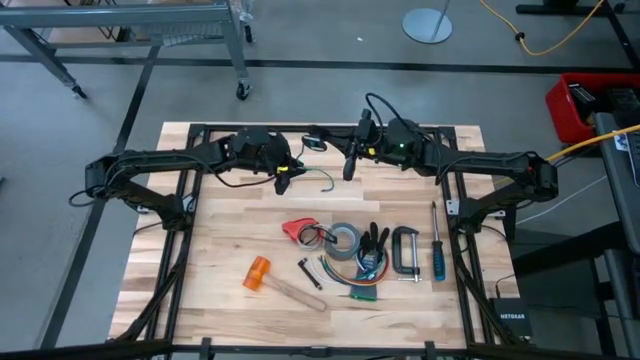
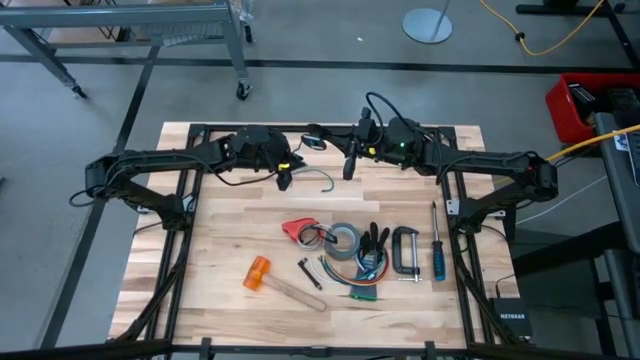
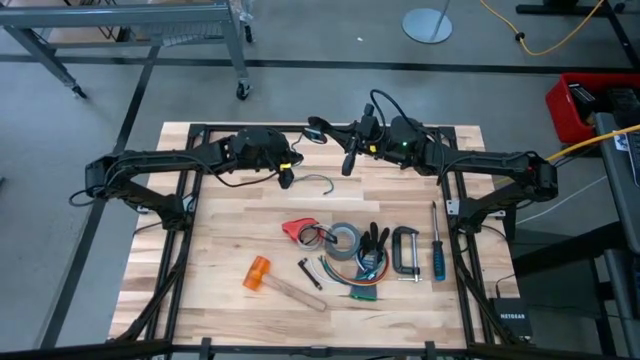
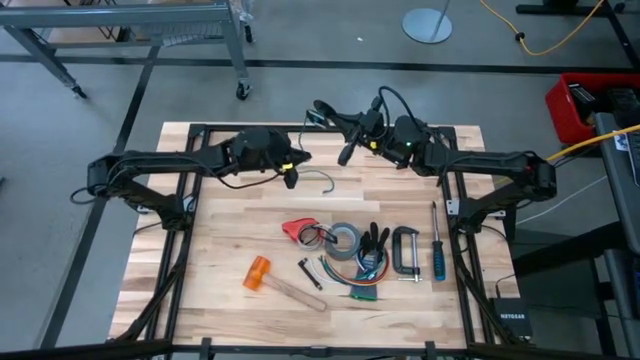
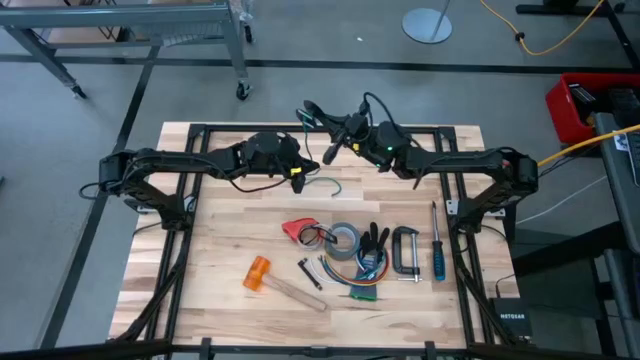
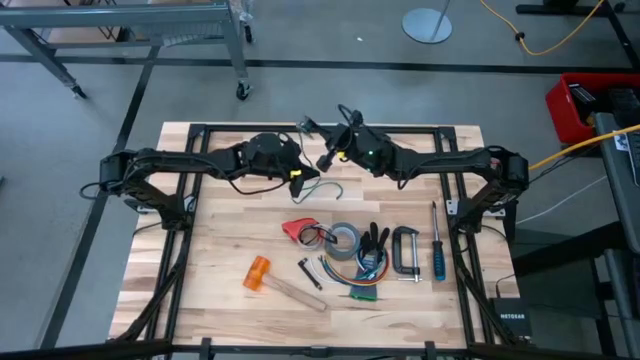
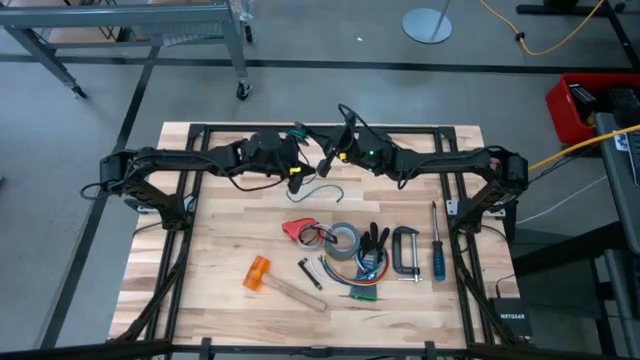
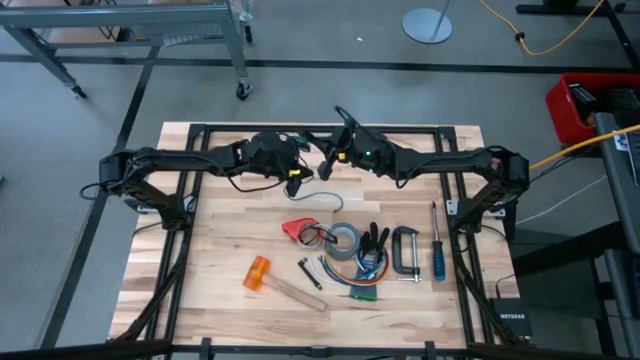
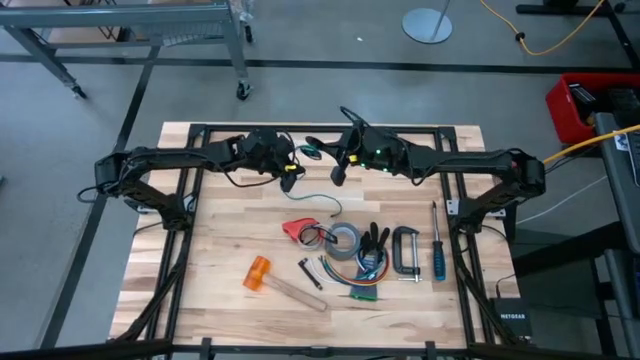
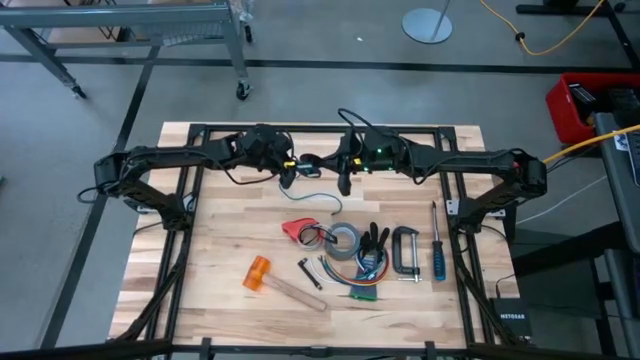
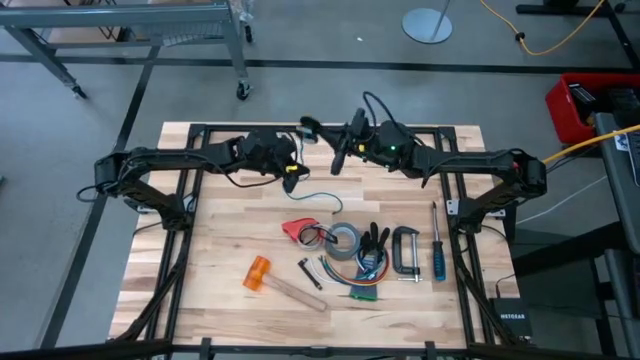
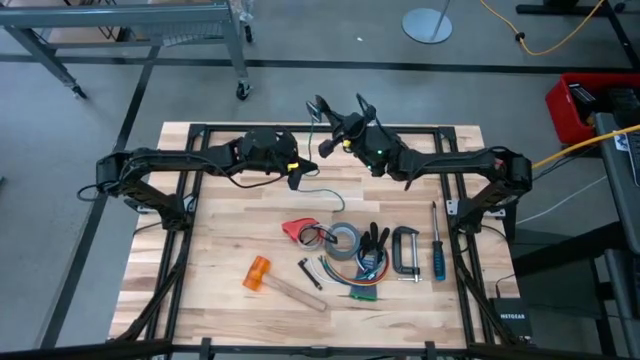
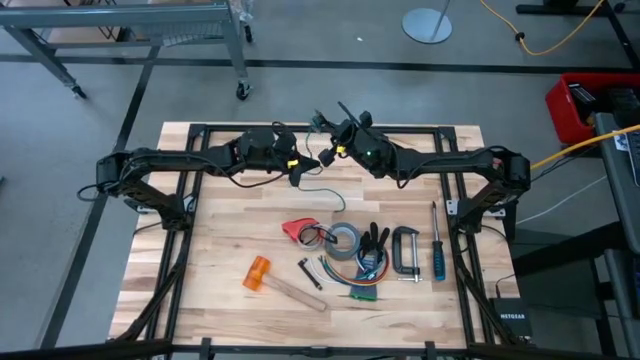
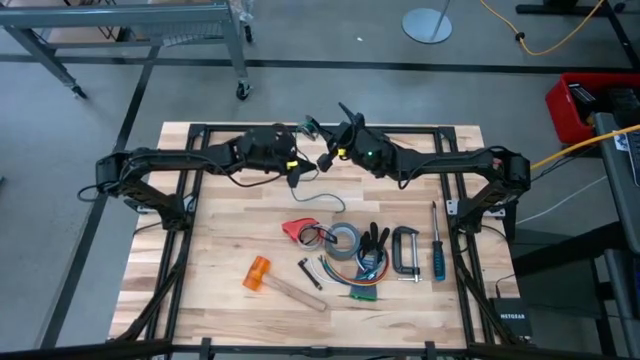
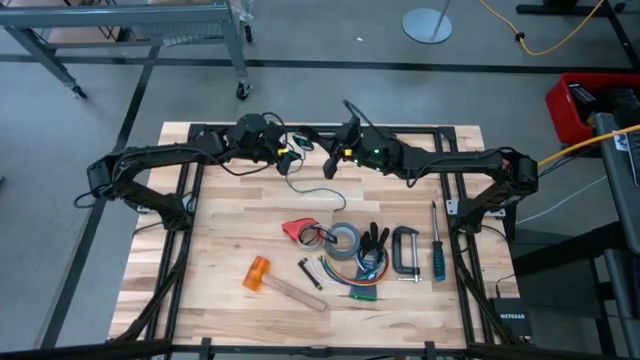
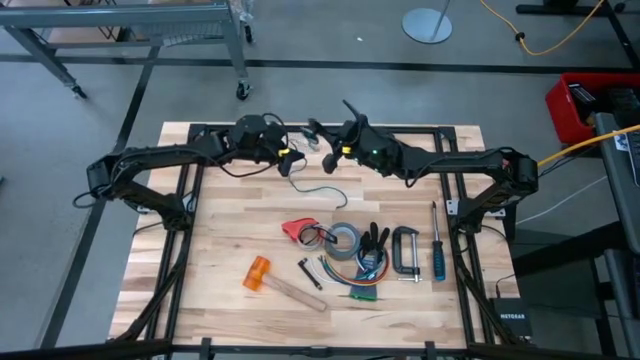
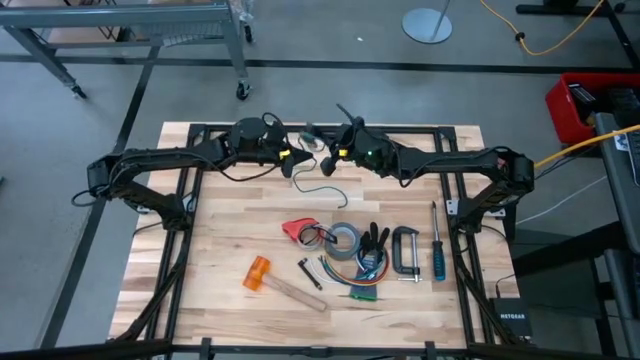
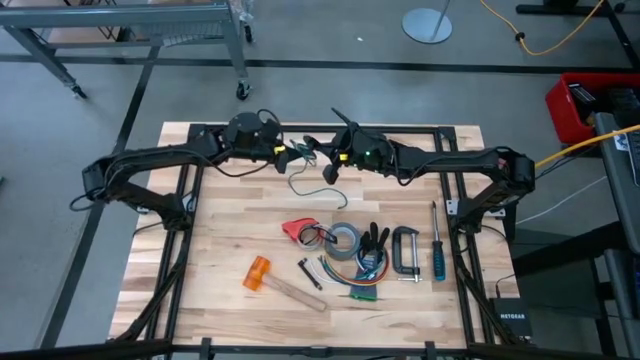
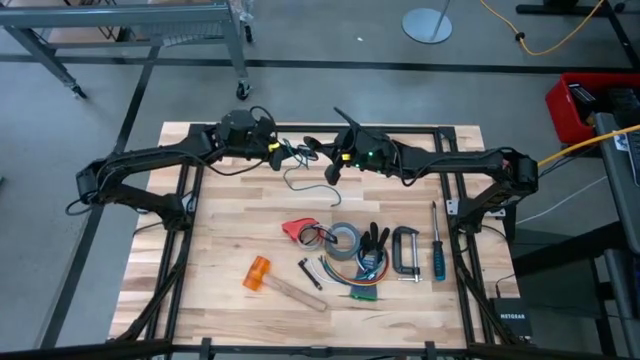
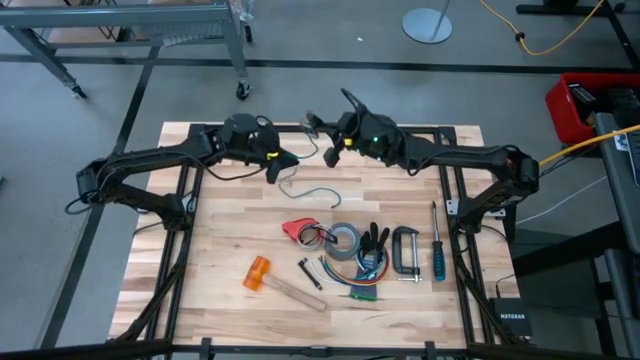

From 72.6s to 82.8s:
Task: Coil cords
Coil the green cable wire on the black spool

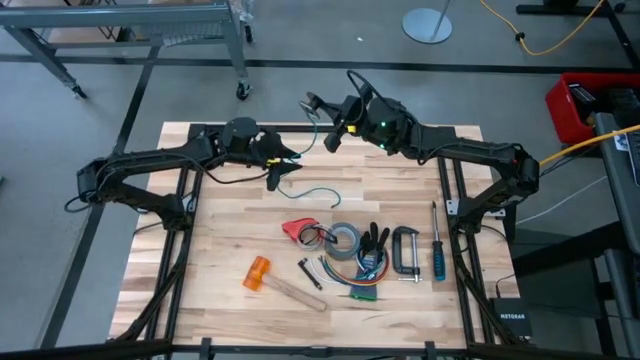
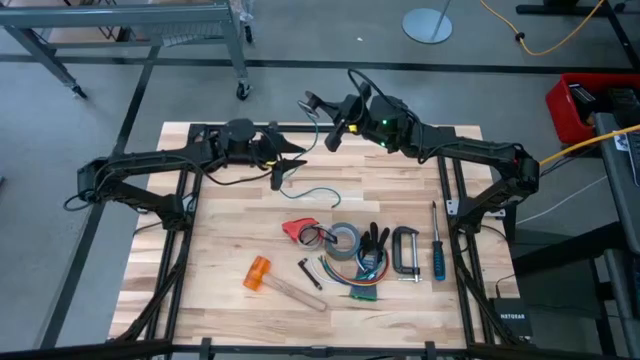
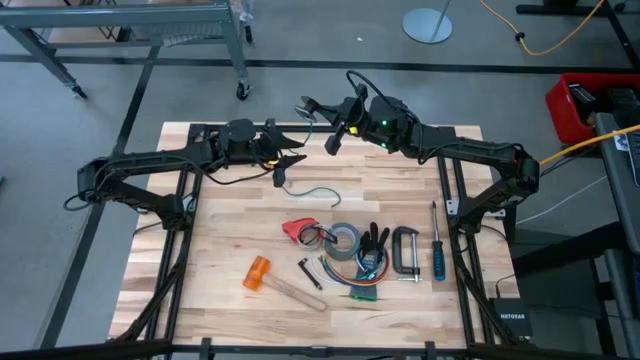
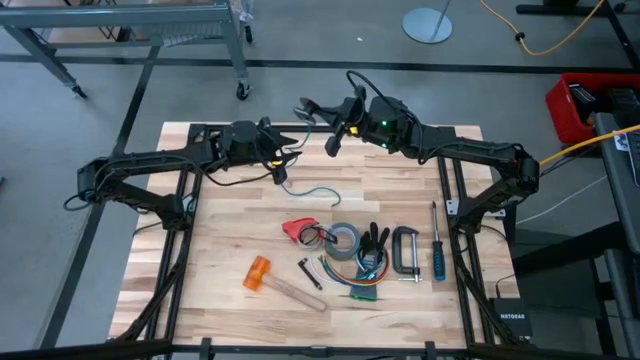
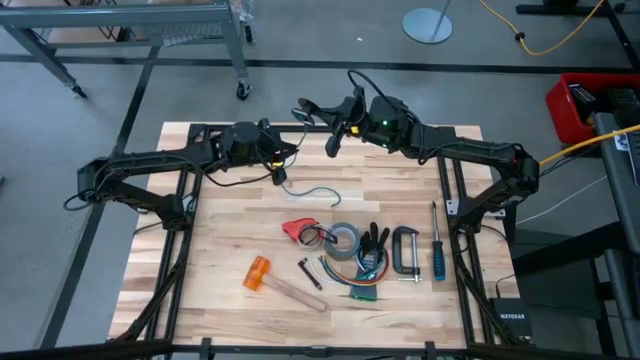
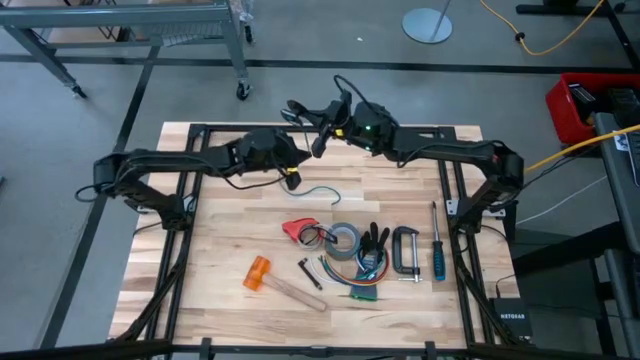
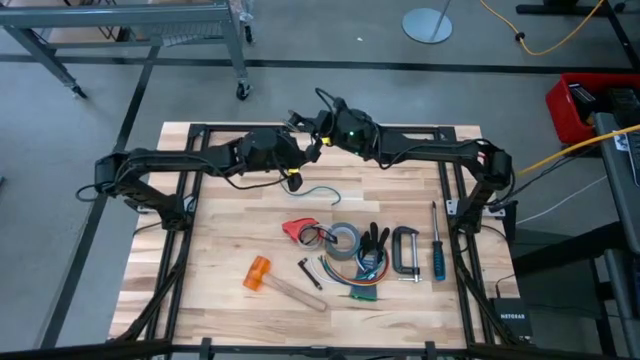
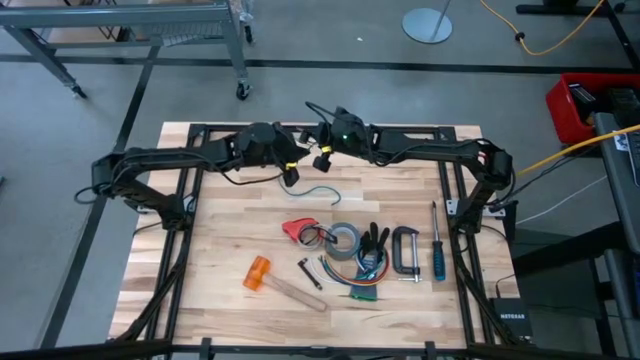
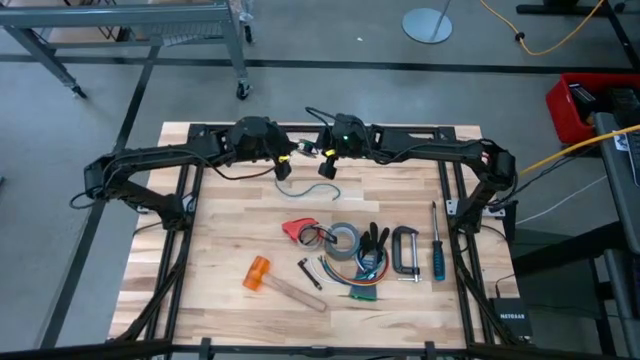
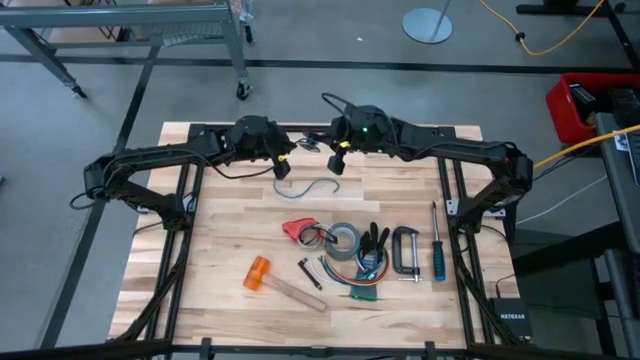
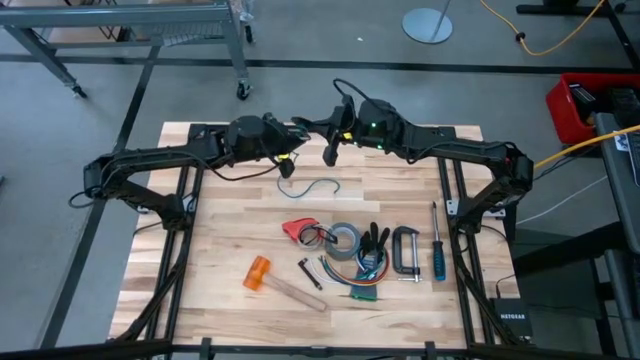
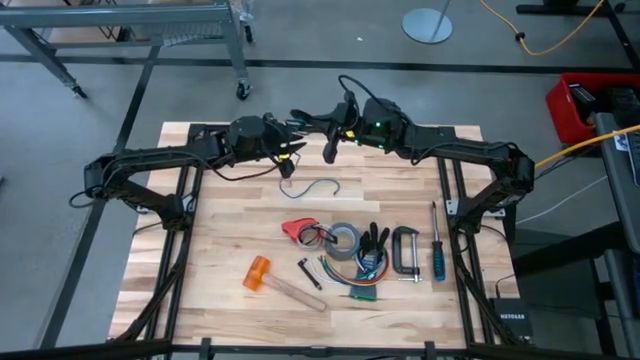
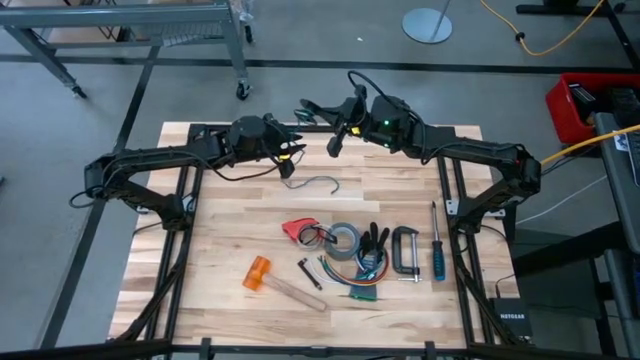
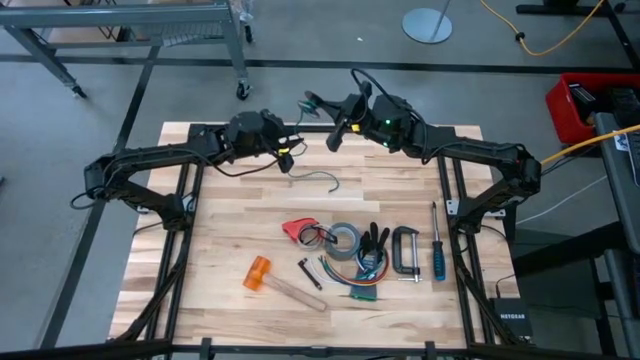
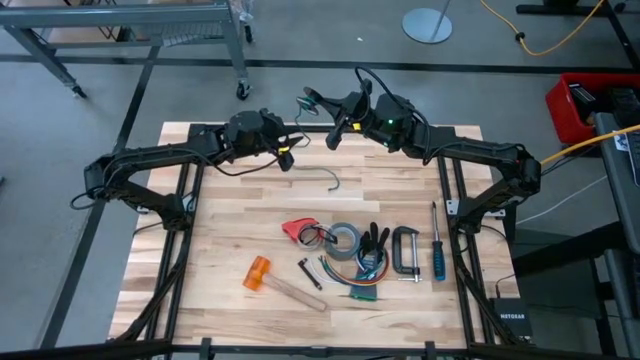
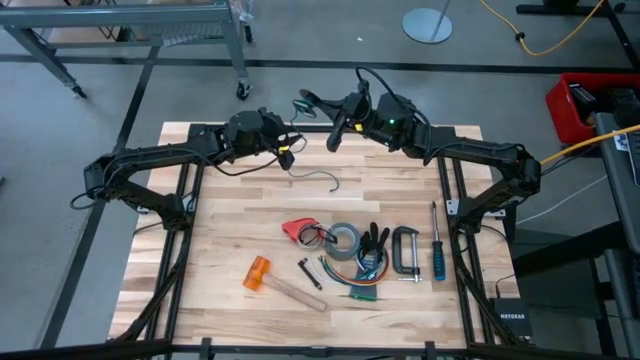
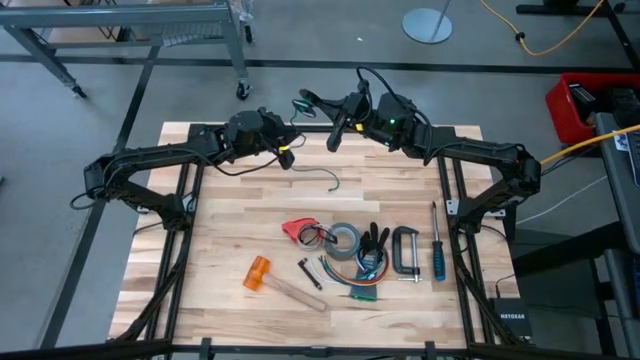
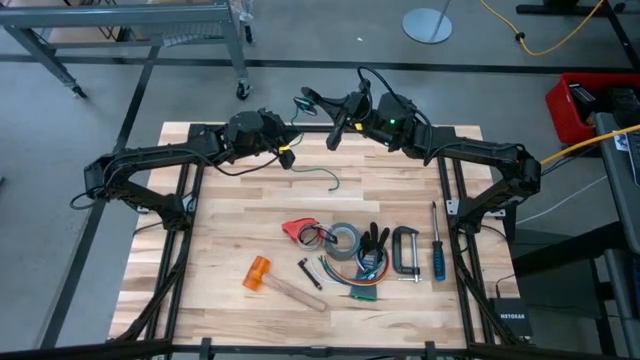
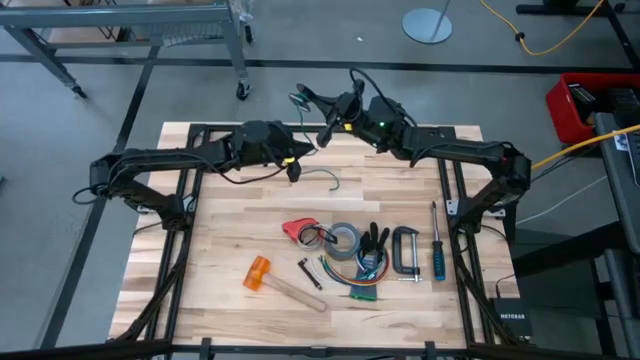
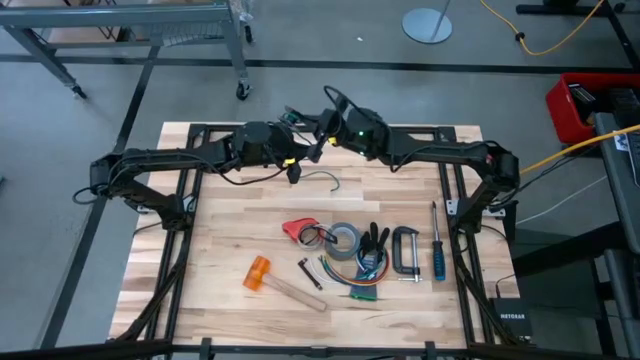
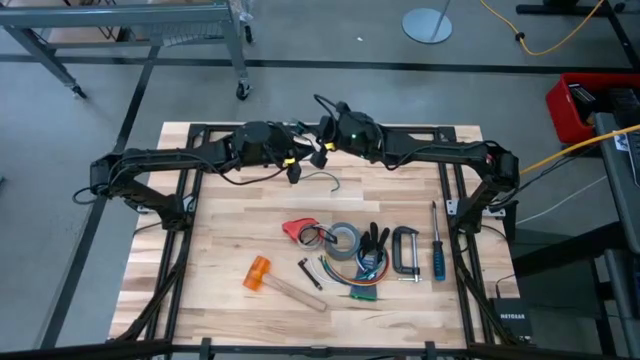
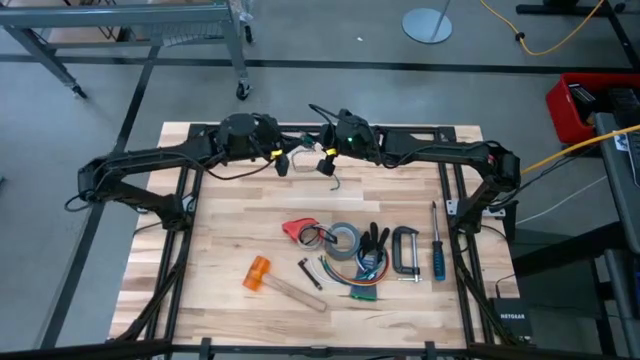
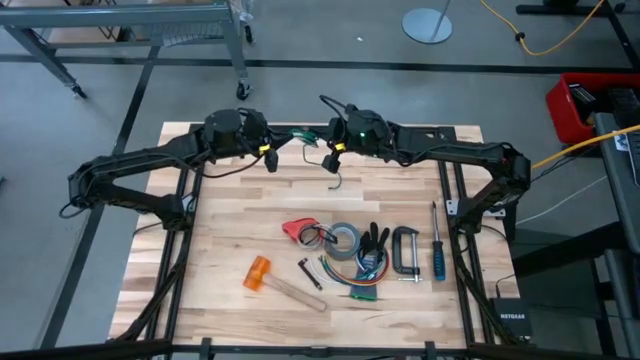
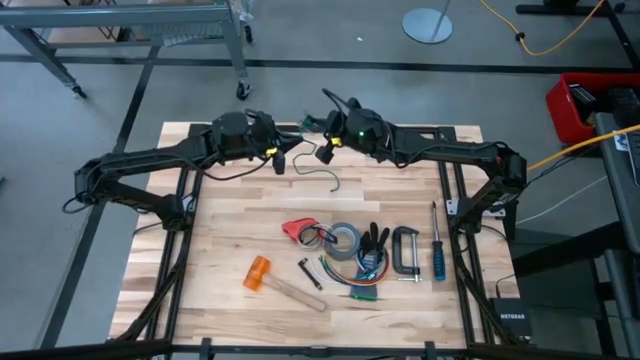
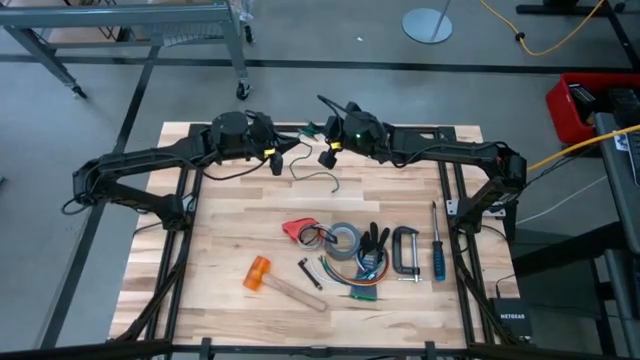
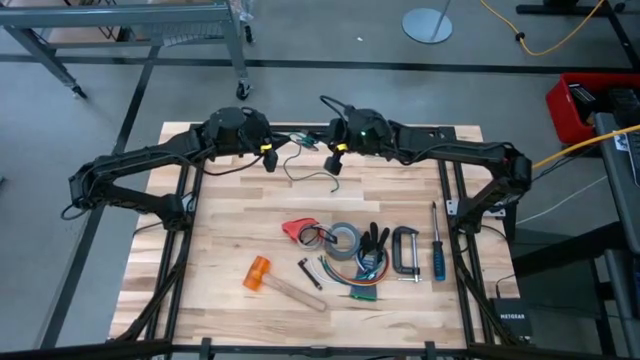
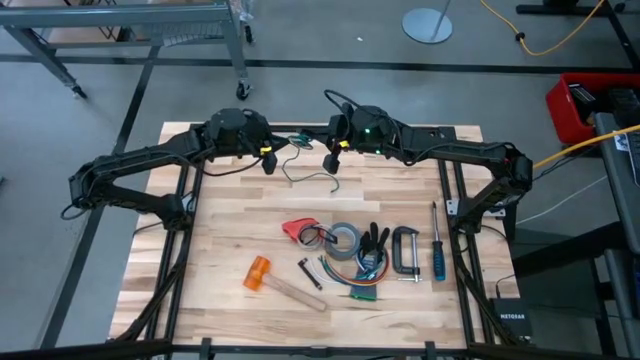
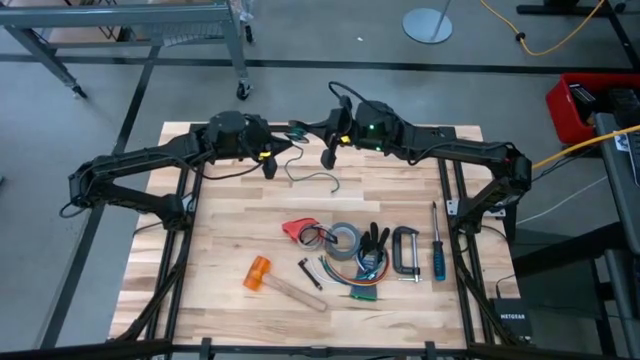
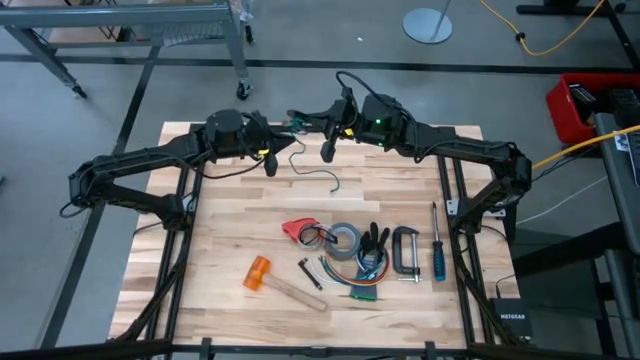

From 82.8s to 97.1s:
Coil the green cable wire on the black spool
